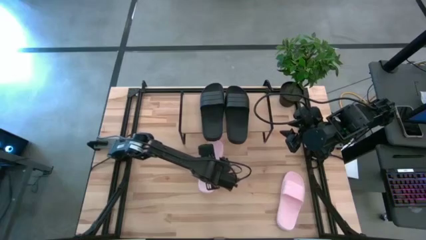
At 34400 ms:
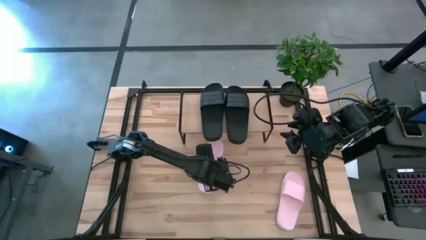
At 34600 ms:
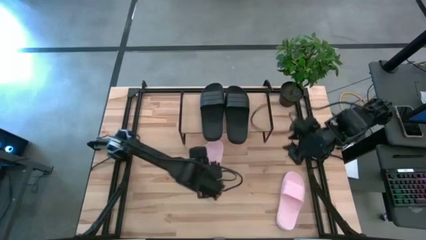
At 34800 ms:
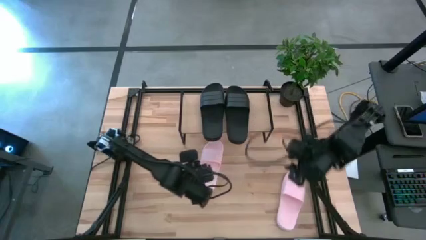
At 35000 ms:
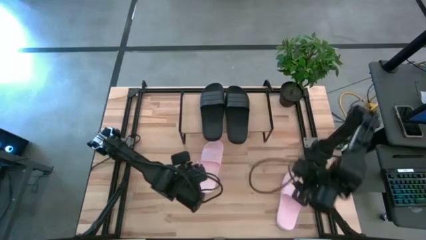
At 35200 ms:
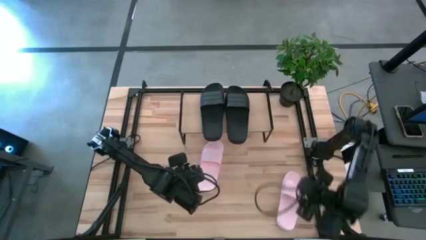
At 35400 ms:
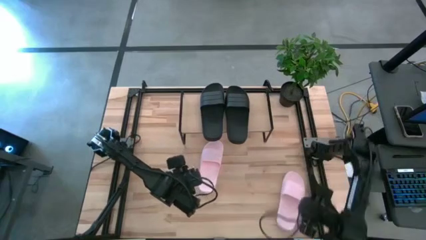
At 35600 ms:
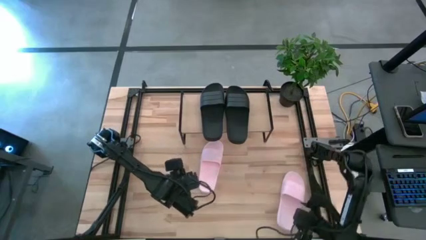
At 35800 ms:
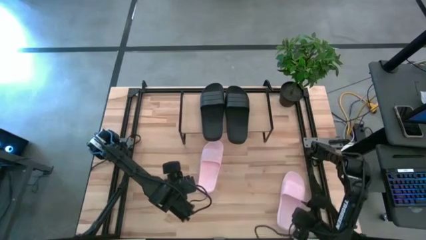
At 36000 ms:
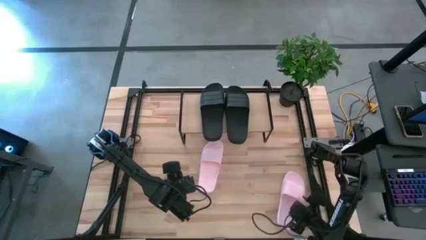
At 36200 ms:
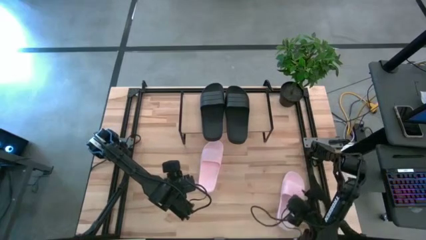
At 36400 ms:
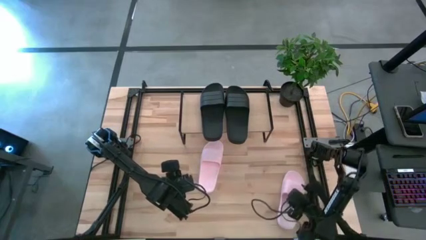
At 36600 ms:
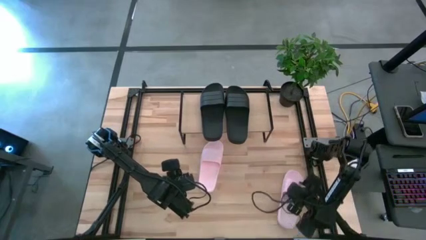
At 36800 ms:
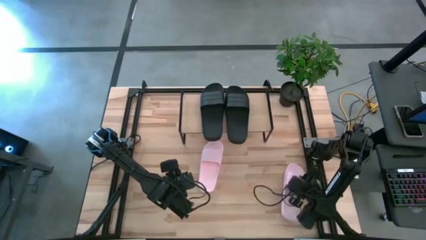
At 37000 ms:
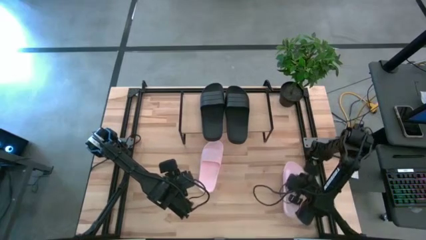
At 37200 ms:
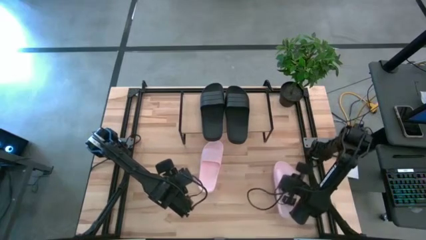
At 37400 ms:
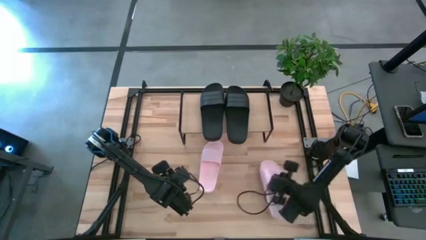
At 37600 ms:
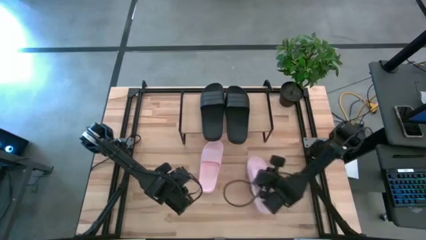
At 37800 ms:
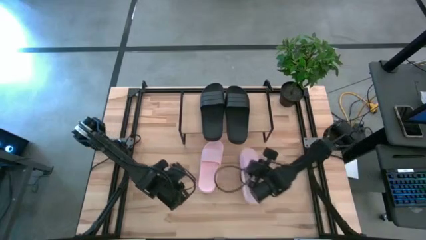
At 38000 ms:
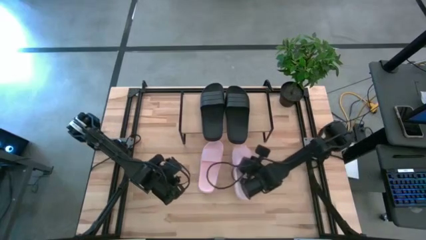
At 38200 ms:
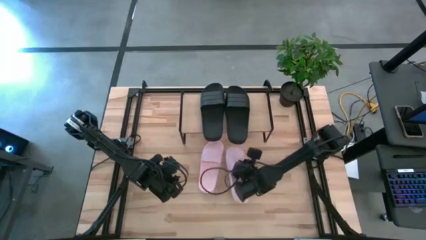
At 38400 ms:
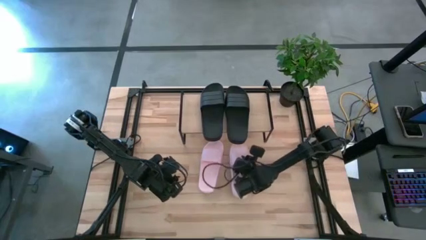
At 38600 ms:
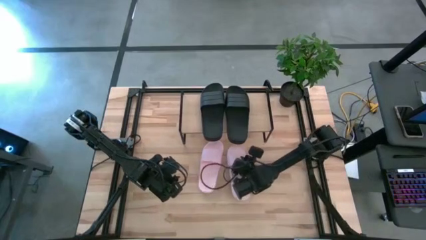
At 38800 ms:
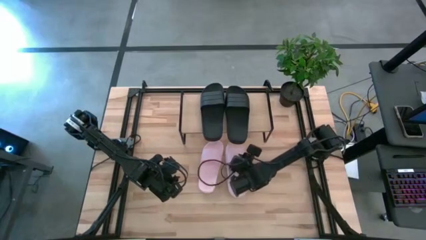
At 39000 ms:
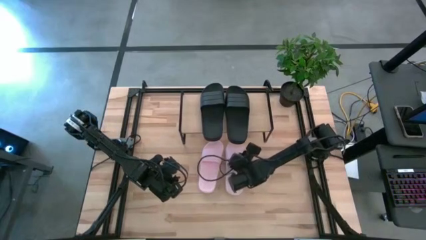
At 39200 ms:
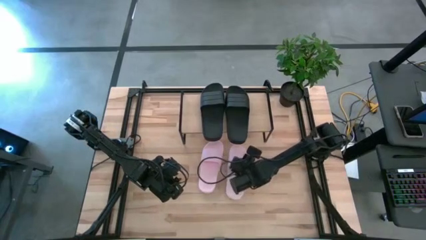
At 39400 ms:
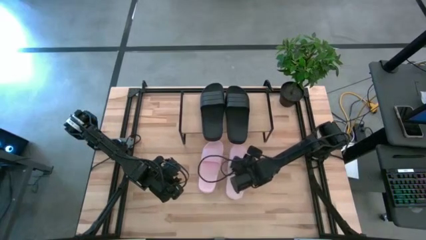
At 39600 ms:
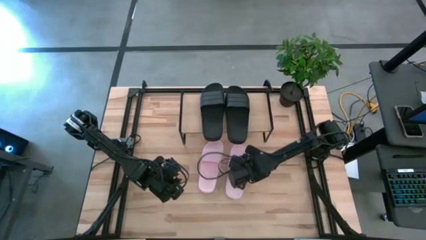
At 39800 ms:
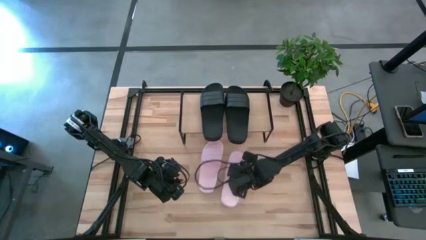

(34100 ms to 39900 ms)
Task: Pick and place slides into the shelf
Move the right pink slide to the center of the table

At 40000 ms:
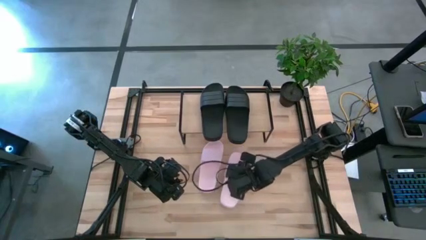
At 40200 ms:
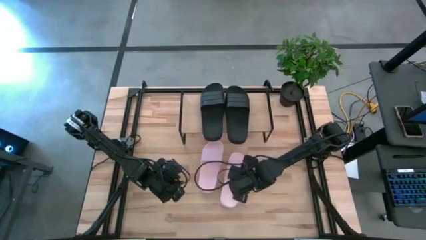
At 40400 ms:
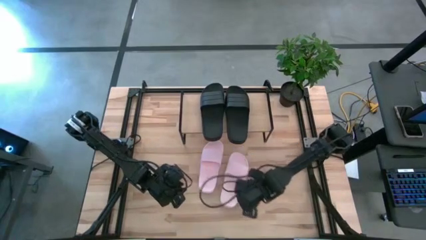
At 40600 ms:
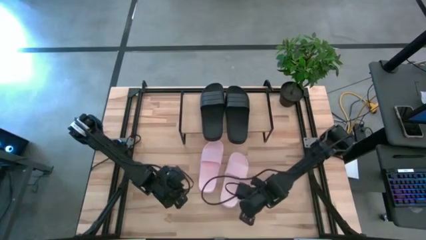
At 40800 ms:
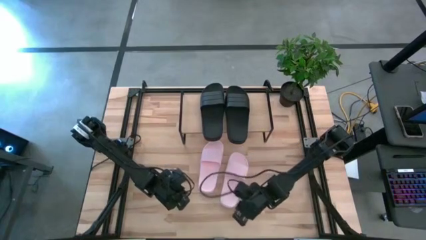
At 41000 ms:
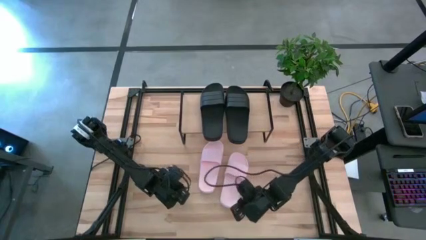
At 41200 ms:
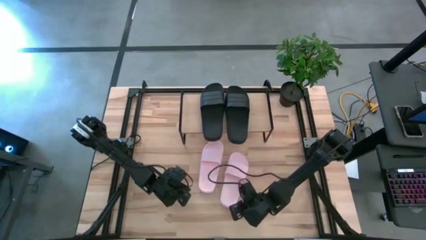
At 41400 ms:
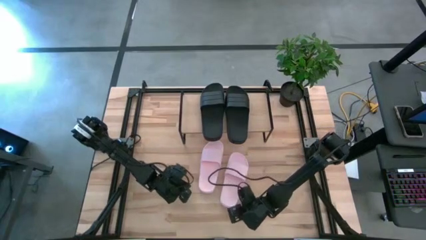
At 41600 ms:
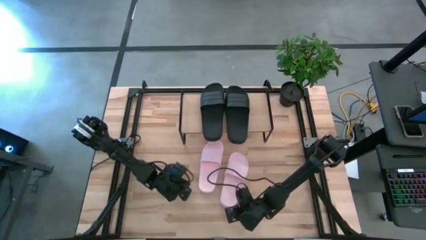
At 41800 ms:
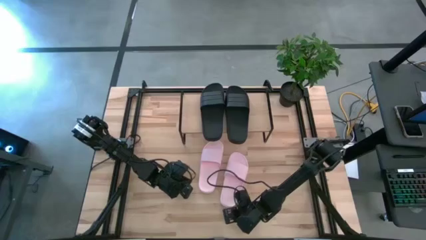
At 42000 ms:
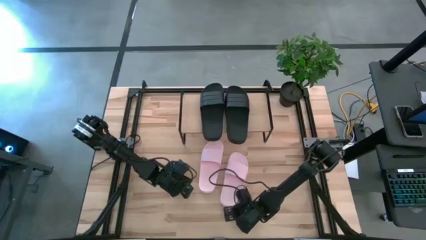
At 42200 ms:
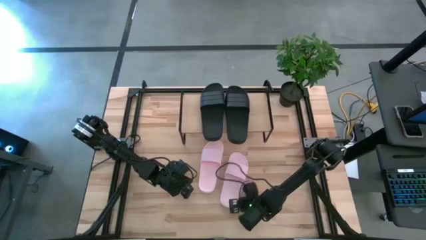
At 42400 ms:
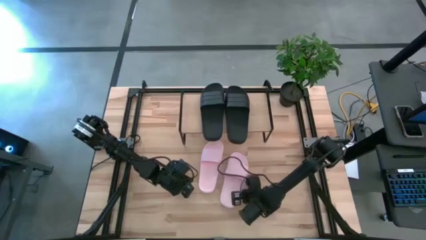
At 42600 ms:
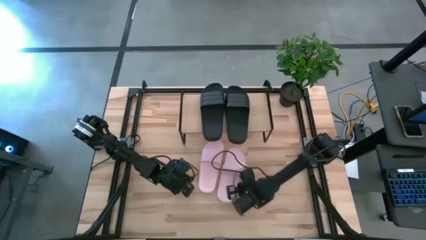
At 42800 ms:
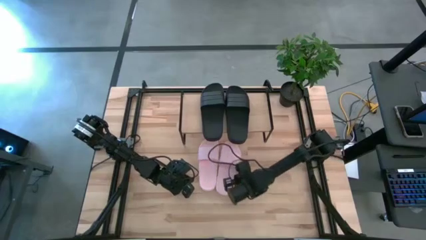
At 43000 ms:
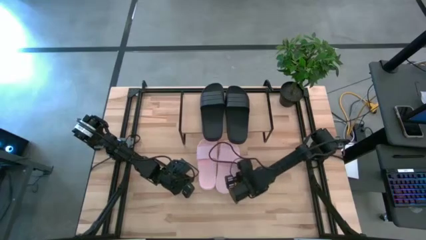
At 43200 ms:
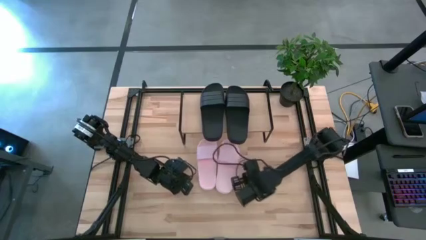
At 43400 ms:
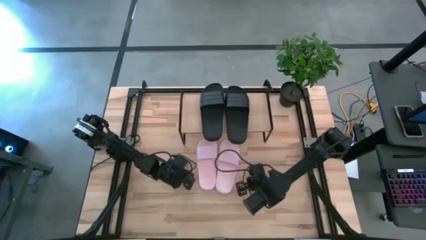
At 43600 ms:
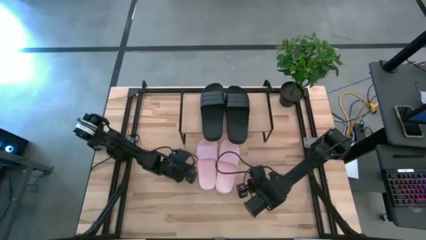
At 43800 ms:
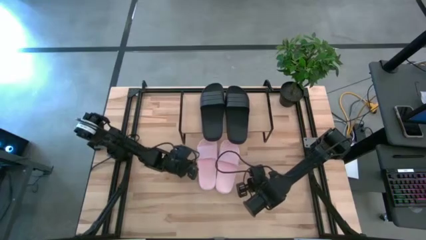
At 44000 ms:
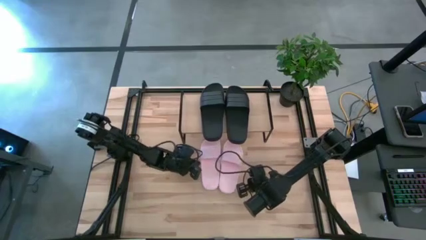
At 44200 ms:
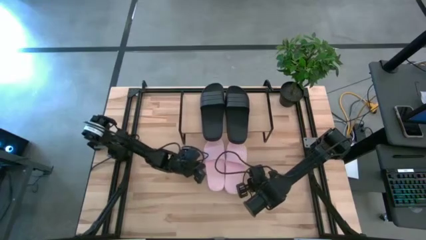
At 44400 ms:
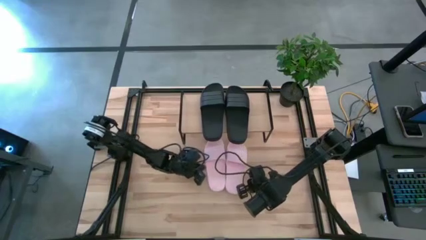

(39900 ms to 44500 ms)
Adjust the pink slides

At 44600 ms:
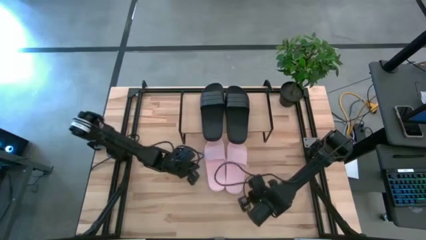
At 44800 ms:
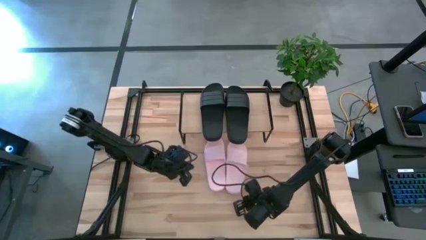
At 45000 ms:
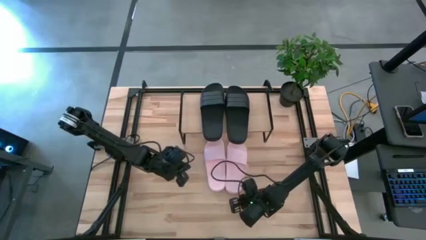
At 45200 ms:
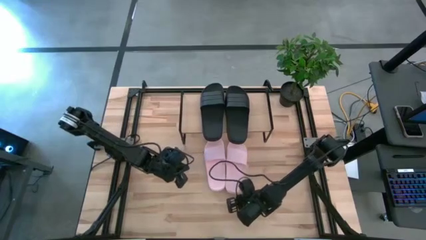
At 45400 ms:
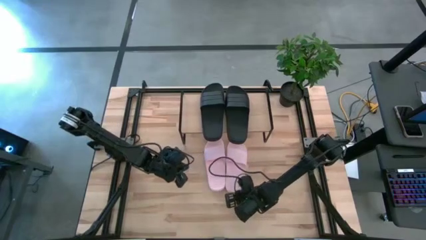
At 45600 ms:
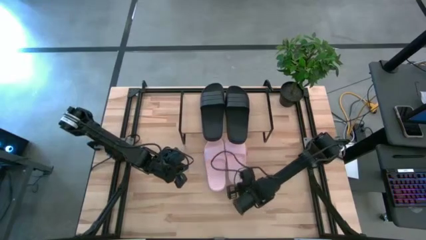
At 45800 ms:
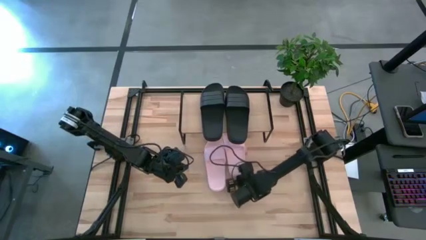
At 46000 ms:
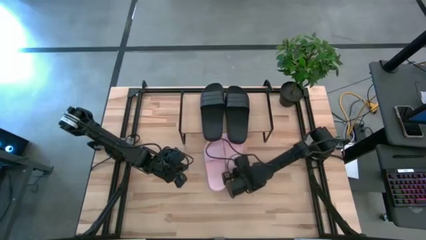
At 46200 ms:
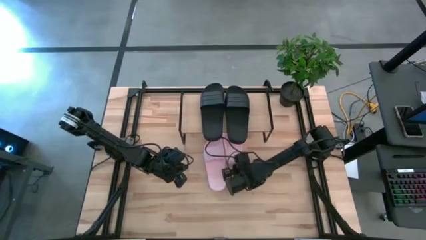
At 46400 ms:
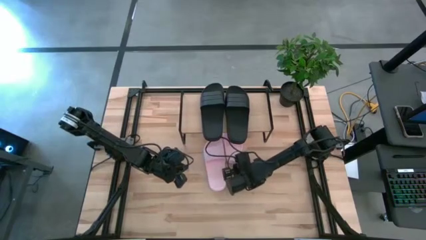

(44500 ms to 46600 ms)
Put the right pink slide under the shelf

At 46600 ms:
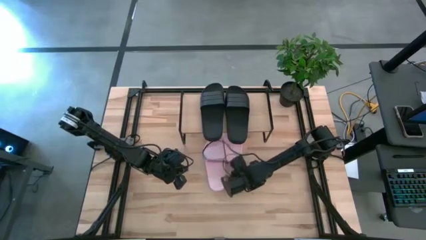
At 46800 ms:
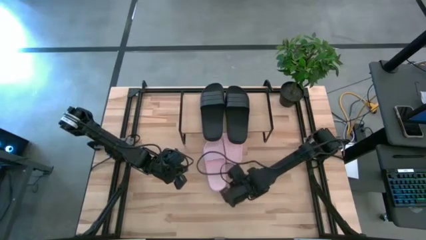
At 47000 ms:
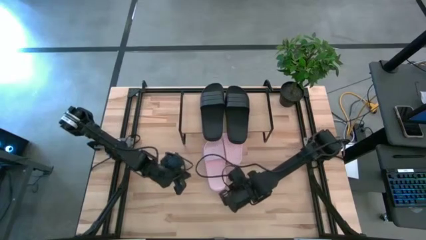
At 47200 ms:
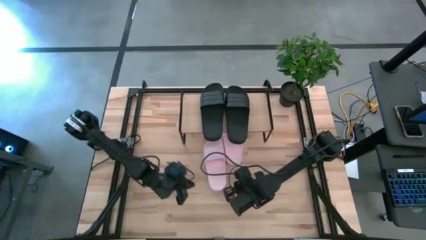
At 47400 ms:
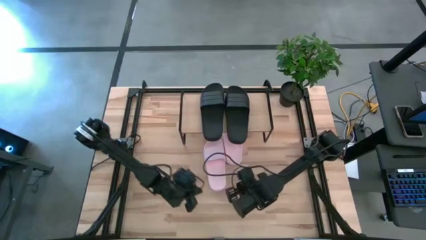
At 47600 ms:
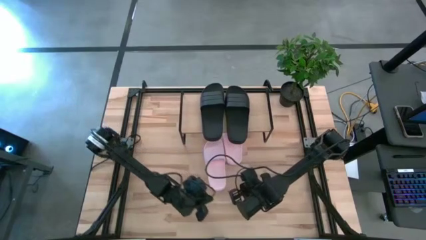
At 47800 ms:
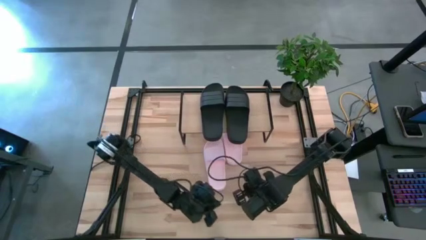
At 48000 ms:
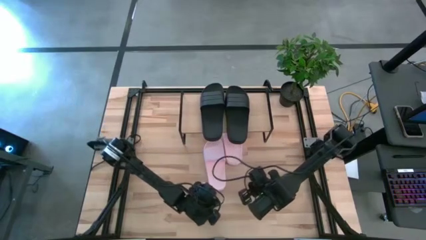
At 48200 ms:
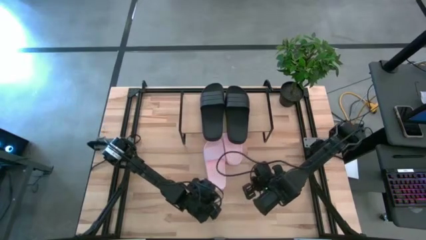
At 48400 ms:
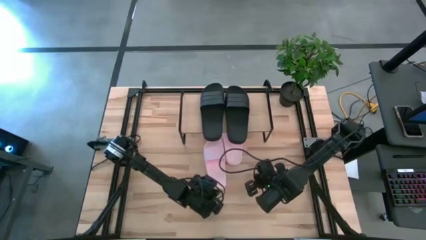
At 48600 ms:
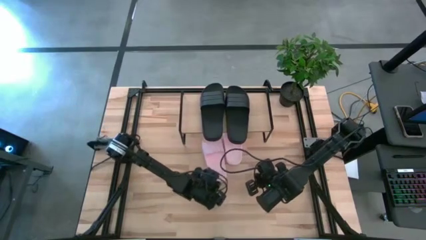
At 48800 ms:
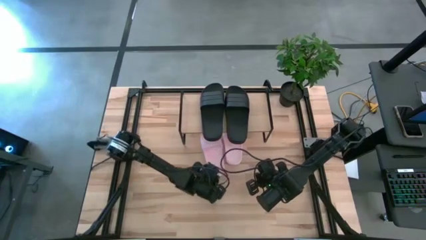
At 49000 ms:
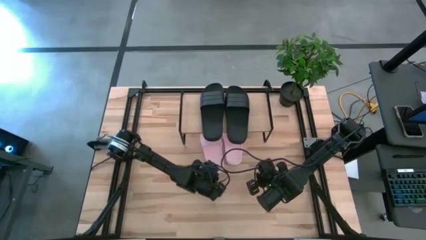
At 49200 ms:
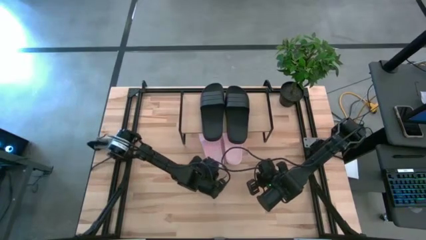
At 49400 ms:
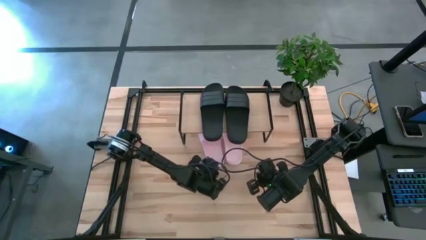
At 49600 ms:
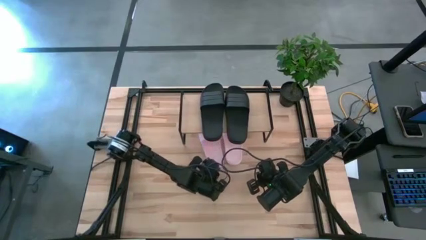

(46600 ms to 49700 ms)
Put the left pink slide under the shelf
